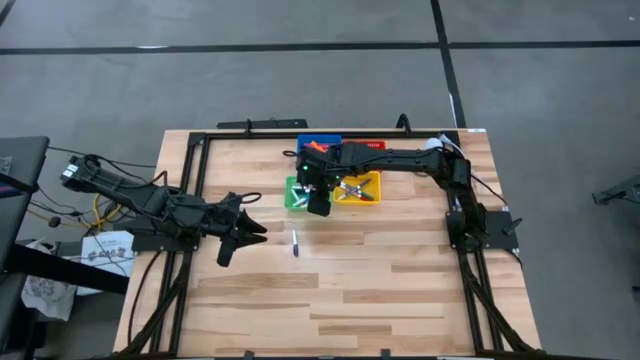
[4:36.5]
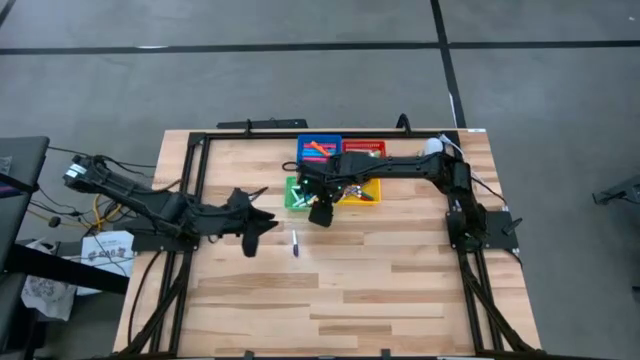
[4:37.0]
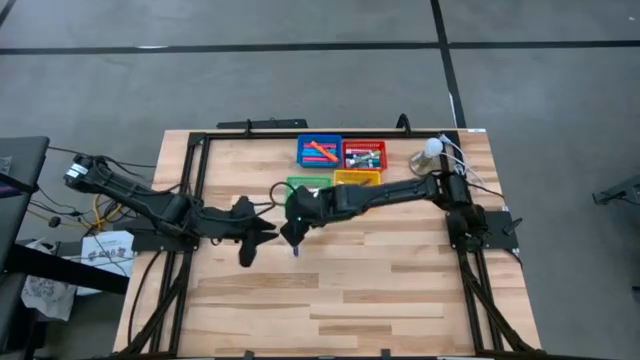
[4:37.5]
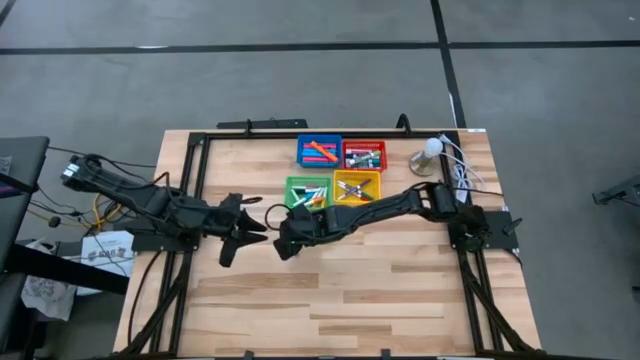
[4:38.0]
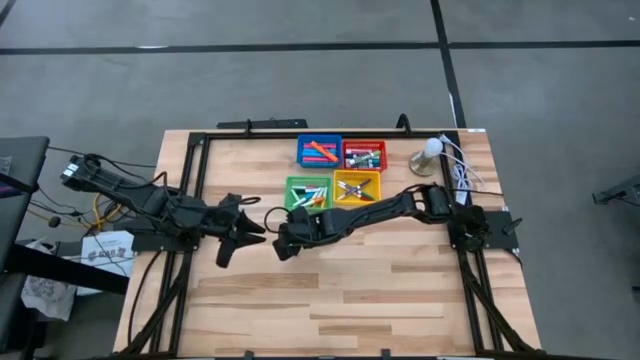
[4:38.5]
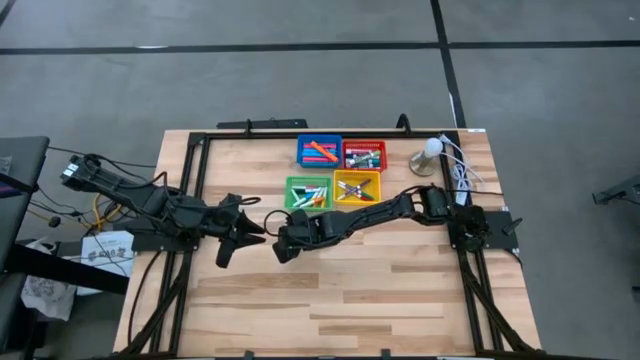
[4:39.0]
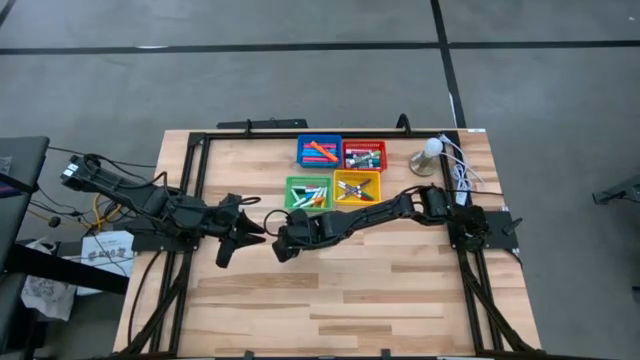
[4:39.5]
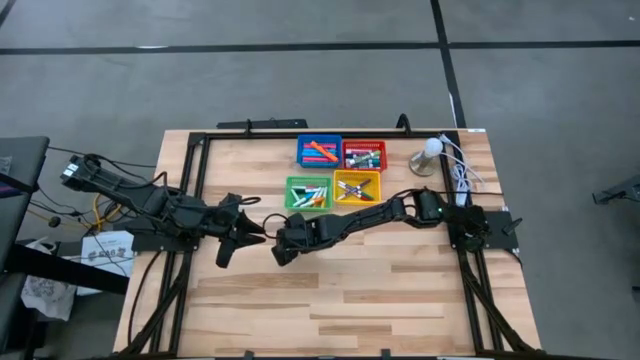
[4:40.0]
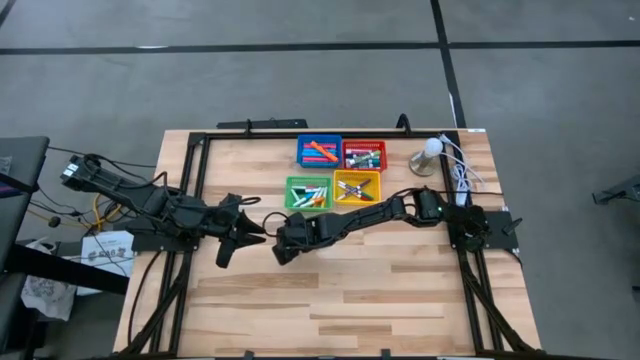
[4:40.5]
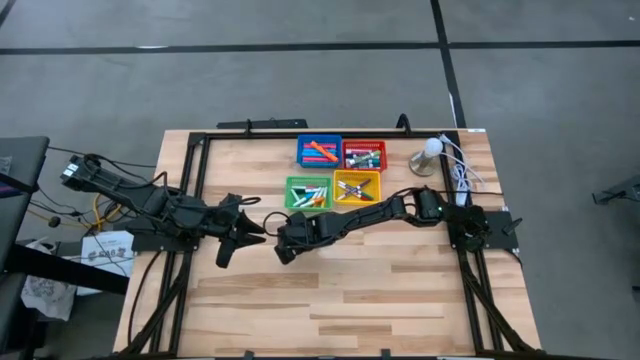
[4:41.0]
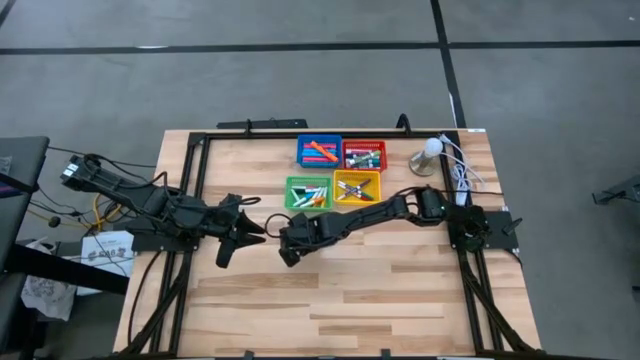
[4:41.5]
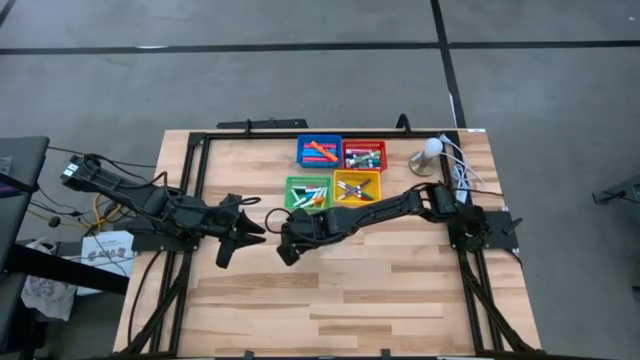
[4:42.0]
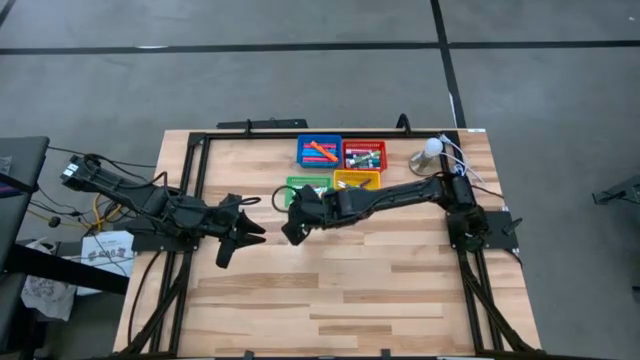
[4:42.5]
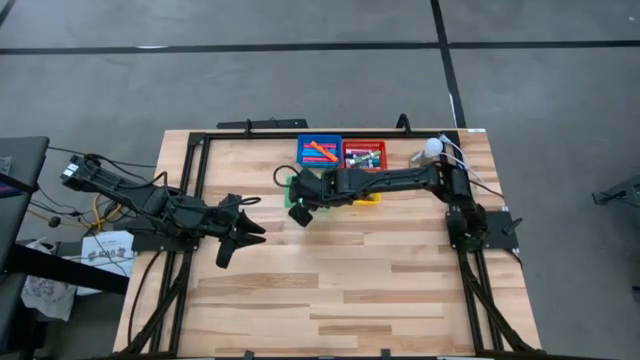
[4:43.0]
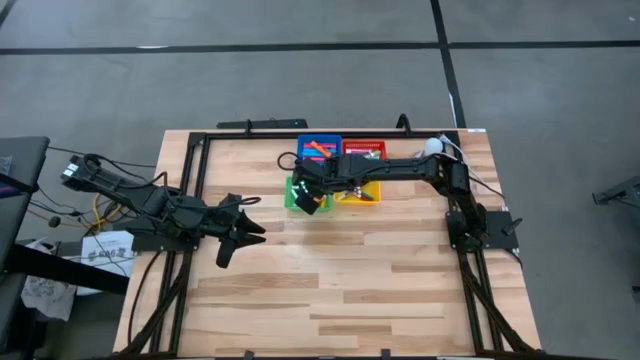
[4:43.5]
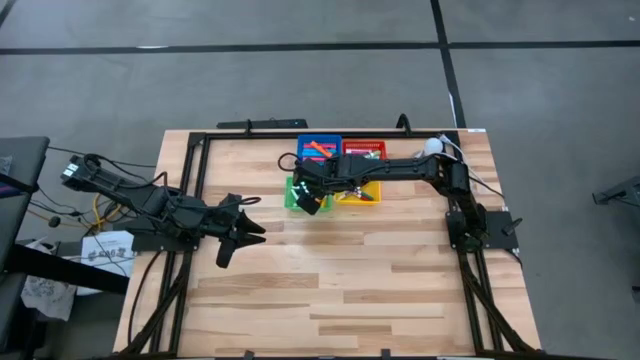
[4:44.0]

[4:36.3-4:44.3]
Task: Pick & Place Markers
Put the blue mini marker into the green bin

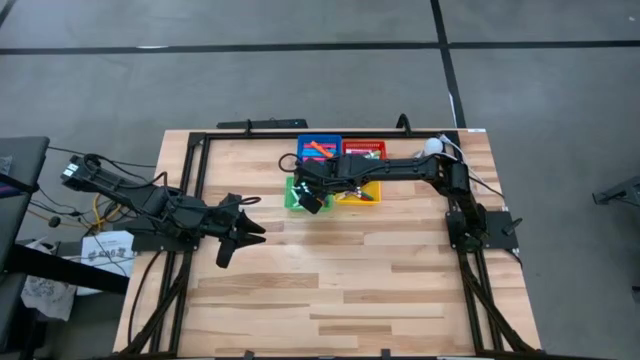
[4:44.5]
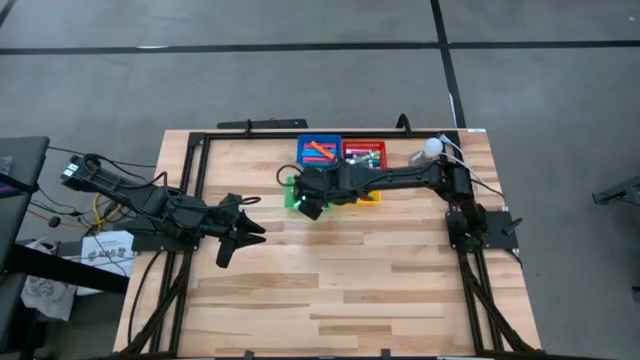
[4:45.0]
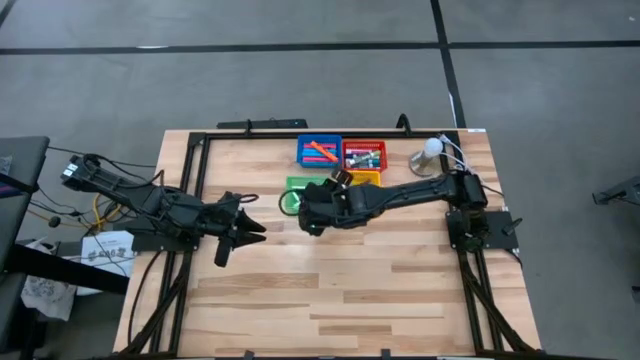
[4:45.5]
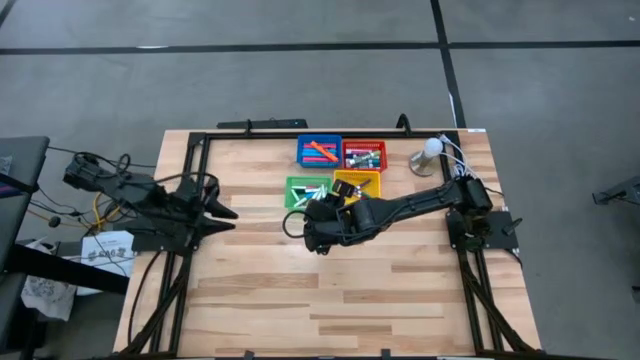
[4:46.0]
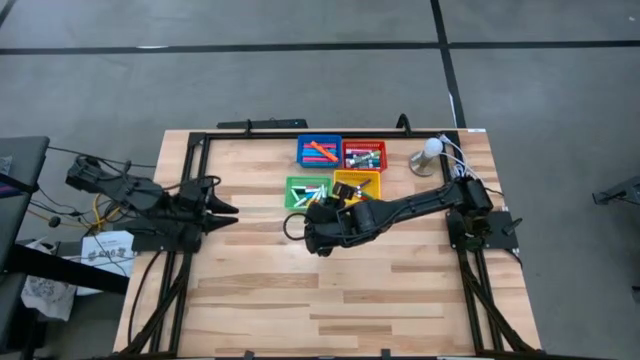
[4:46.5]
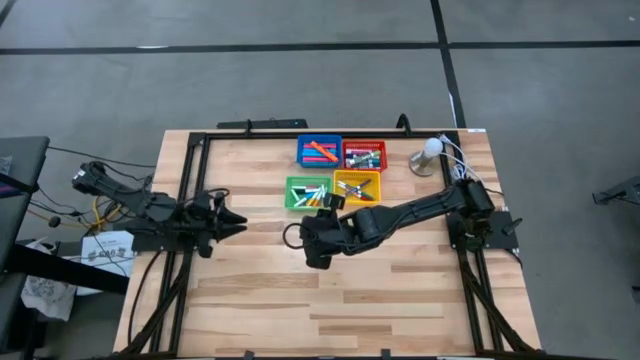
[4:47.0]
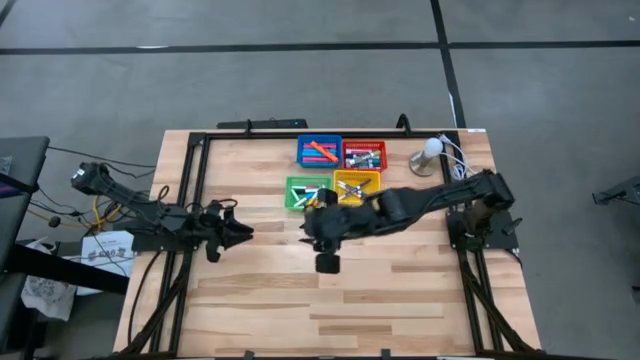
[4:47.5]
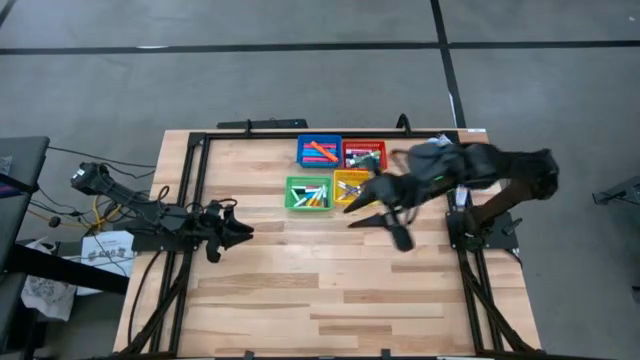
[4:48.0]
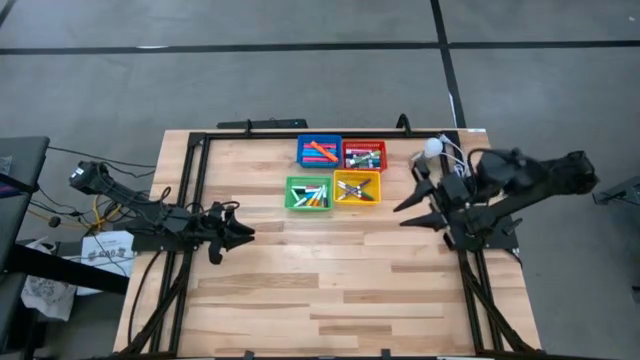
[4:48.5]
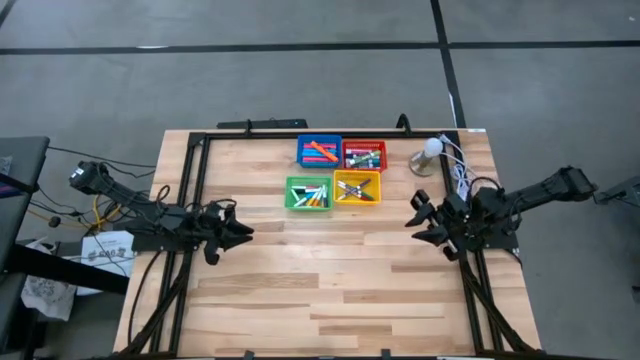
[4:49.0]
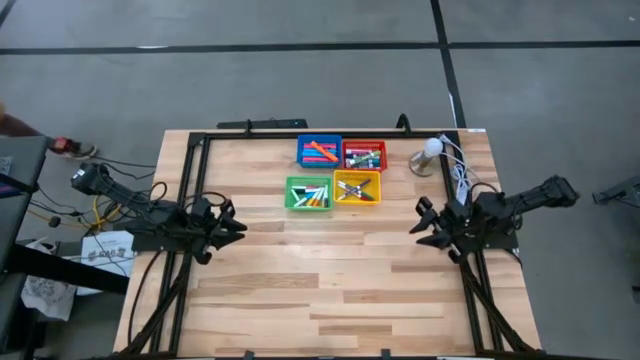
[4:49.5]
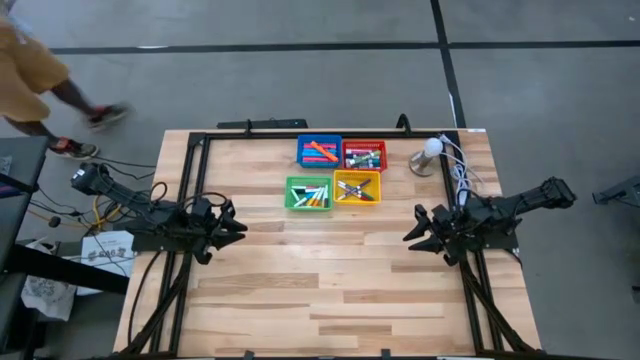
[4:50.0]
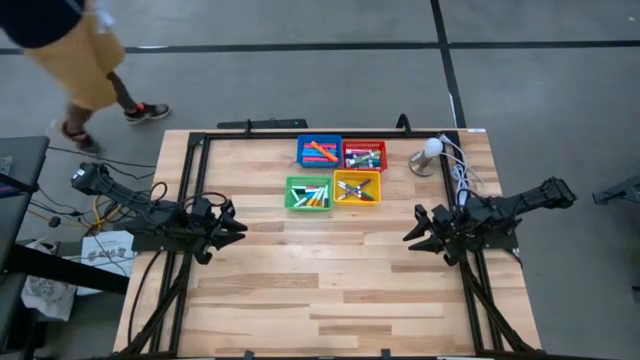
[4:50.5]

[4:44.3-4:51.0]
Return to Home Position

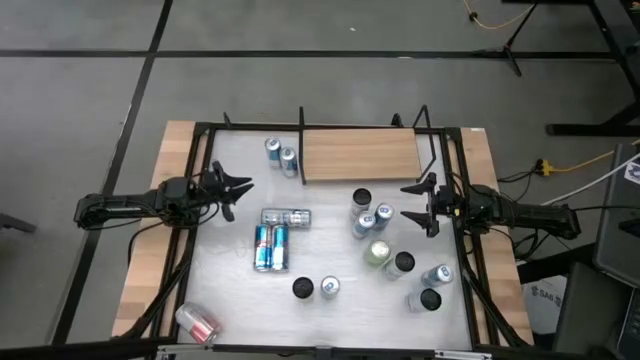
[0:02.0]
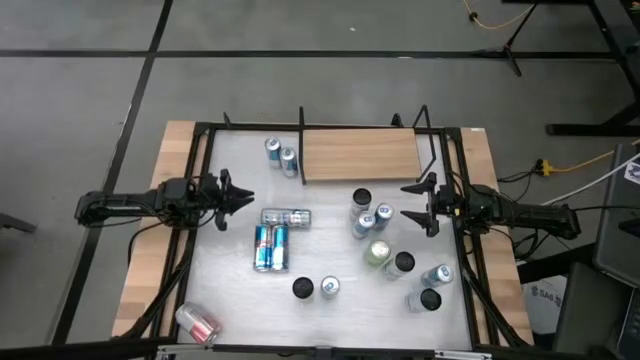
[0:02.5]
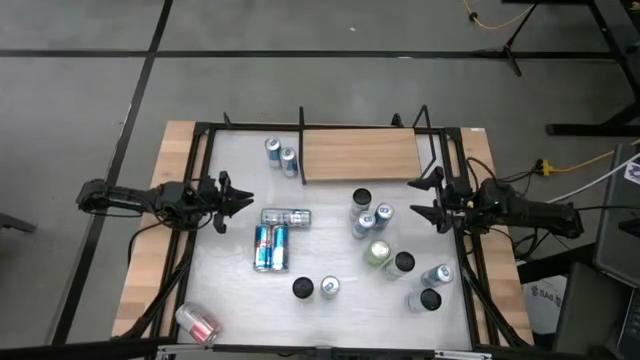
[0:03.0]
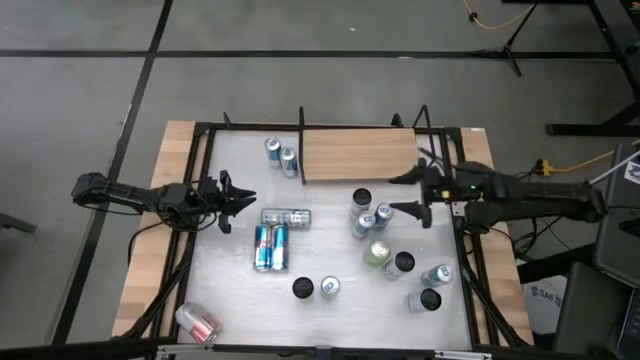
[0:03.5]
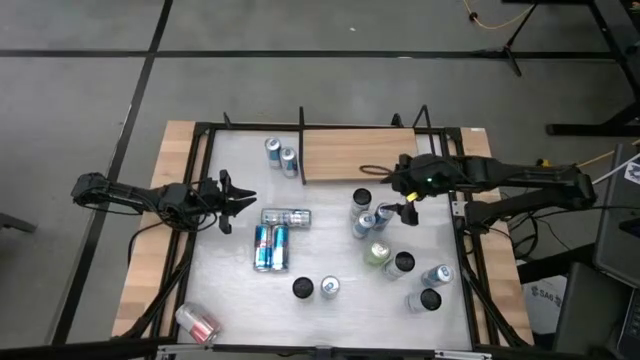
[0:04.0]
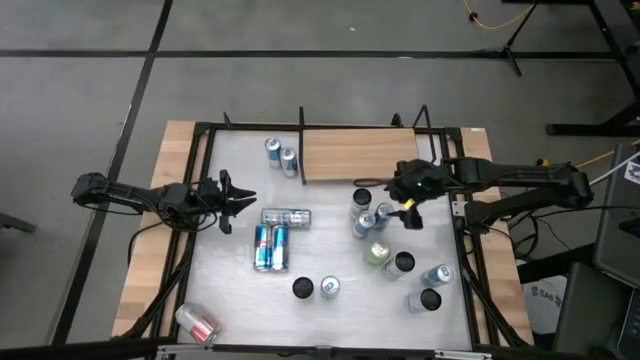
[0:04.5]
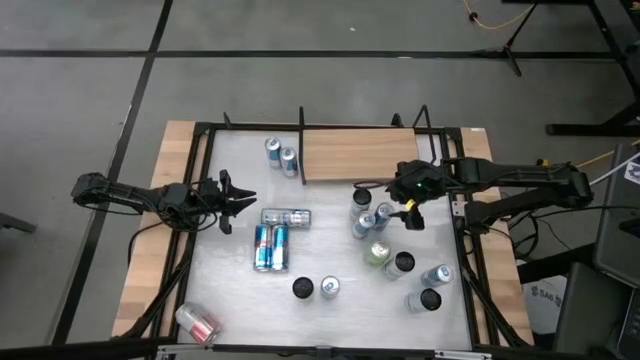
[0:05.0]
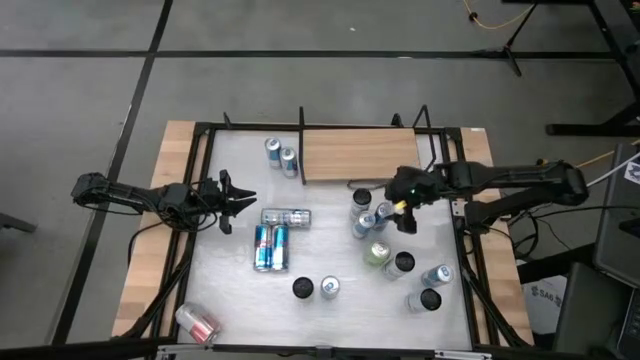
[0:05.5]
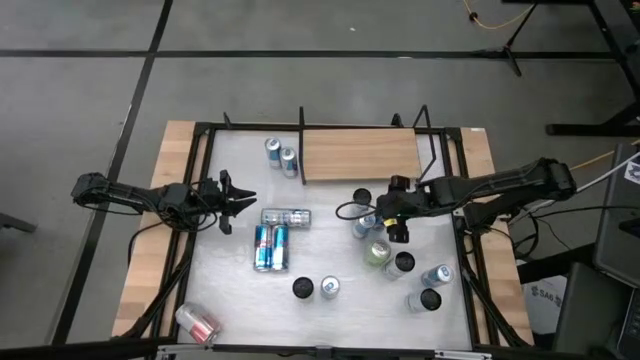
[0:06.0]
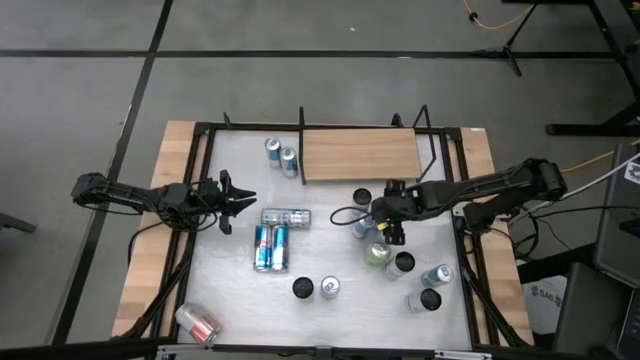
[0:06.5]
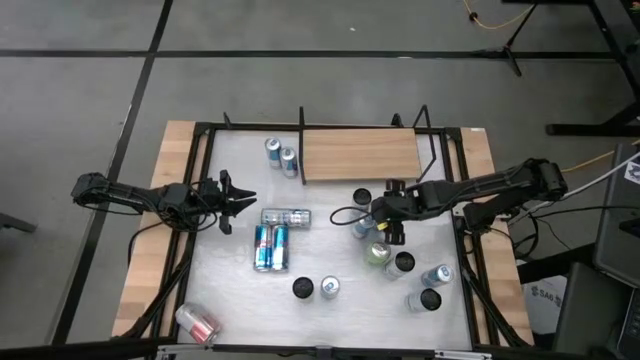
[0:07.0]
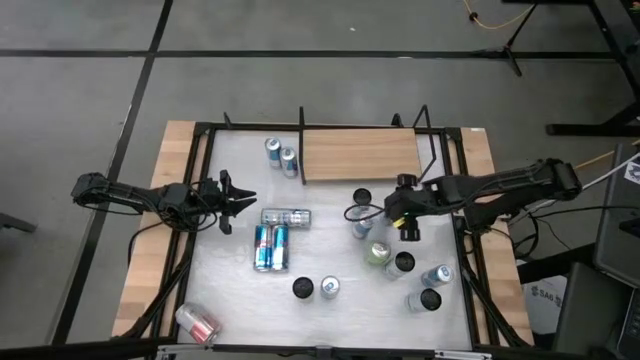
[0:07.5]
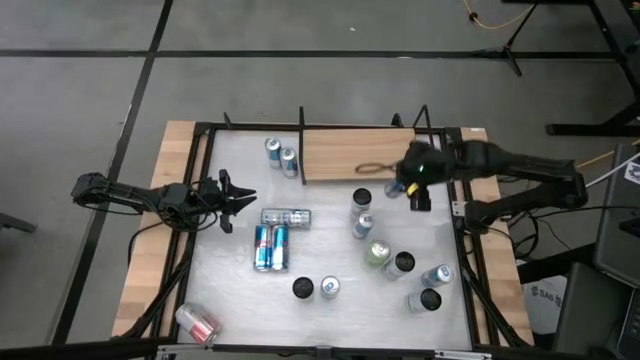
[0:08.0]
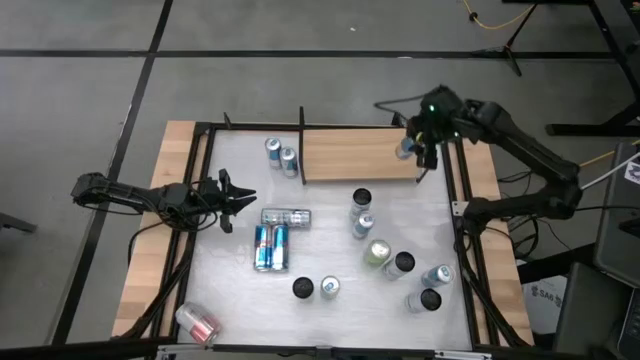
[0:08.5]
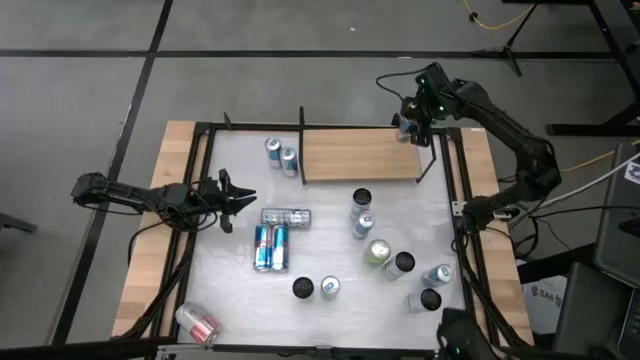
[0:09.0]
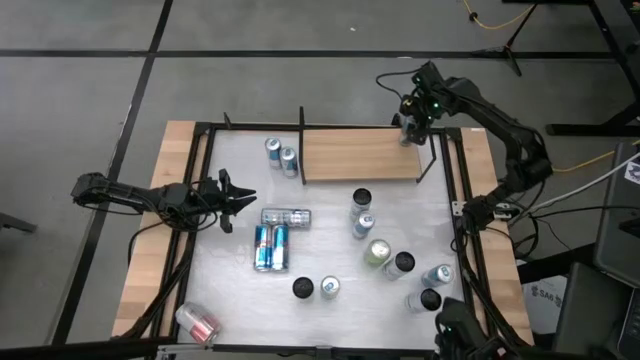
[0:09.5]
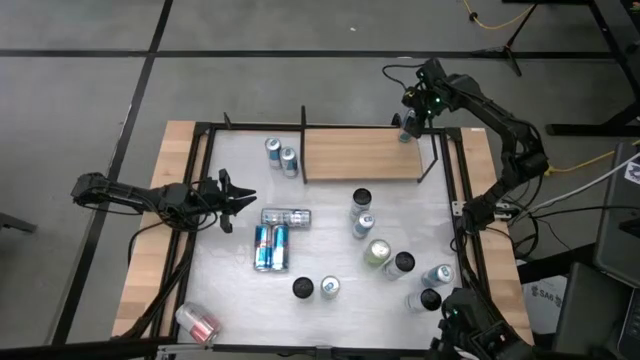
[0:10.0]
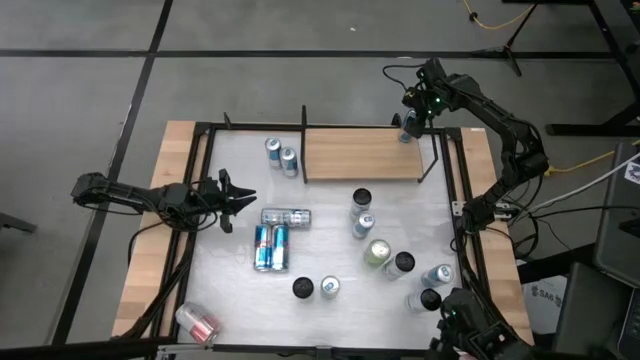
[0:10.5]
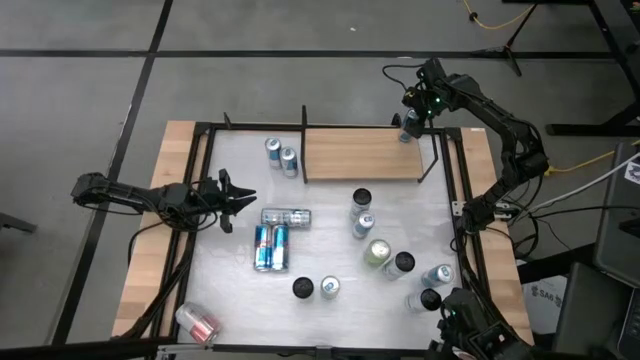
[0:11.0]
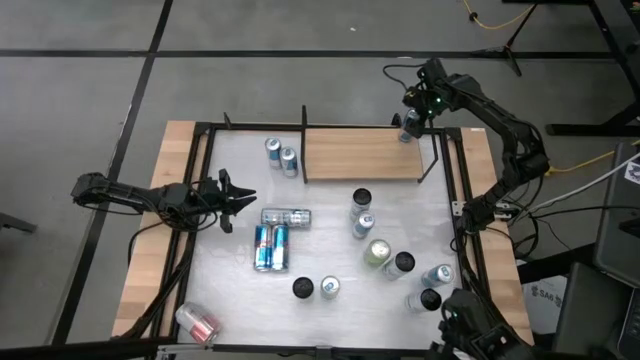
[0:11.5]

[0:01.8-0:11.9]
Task: Place canned beverage on shelf
Put the blue soda can on the shelf
